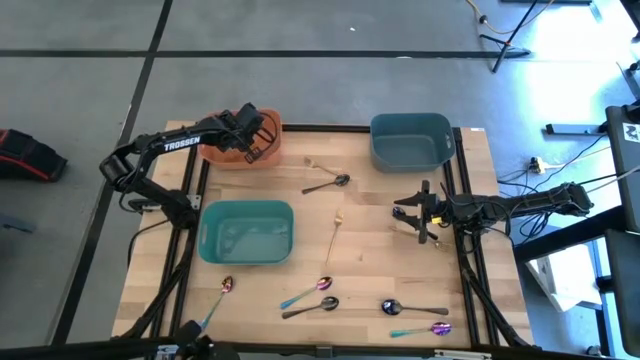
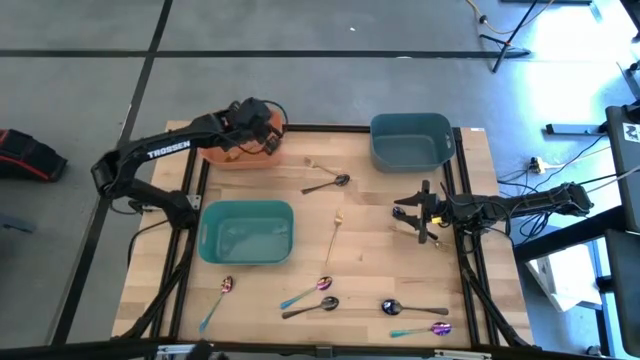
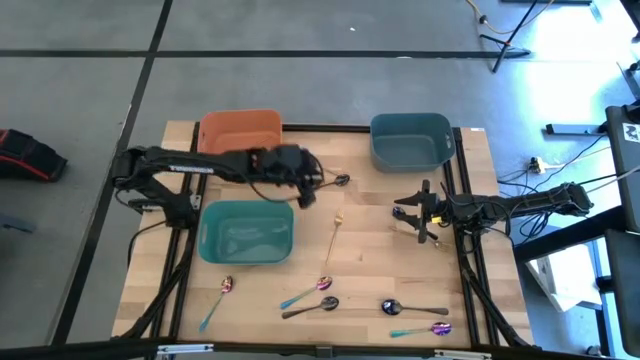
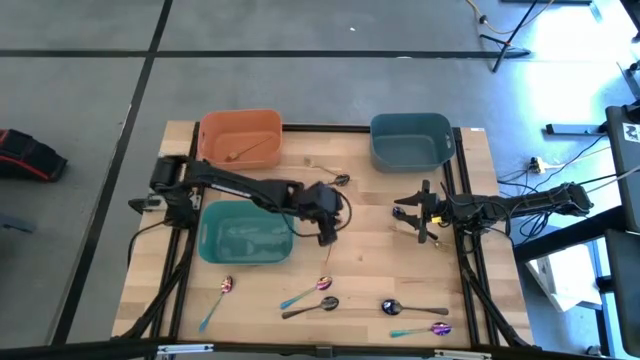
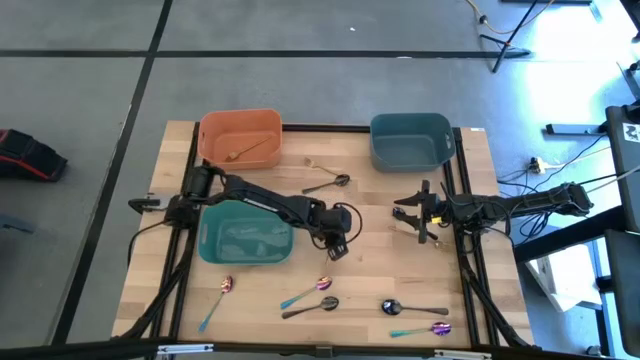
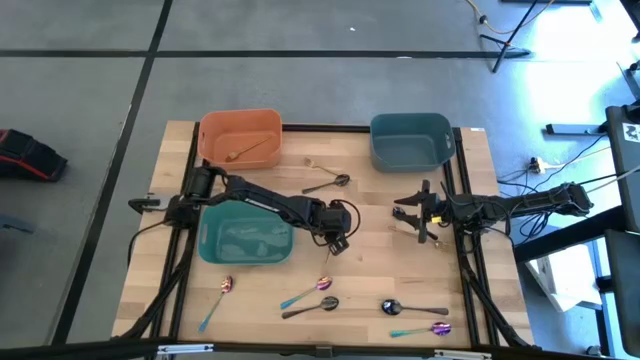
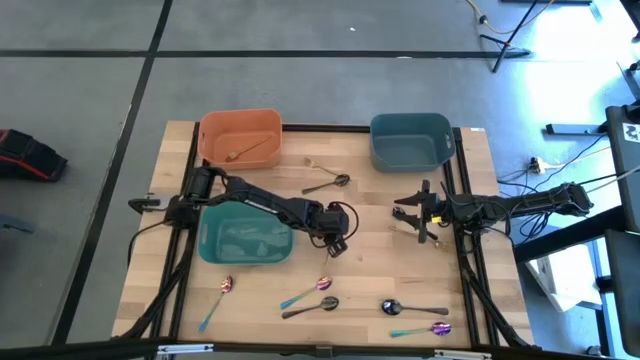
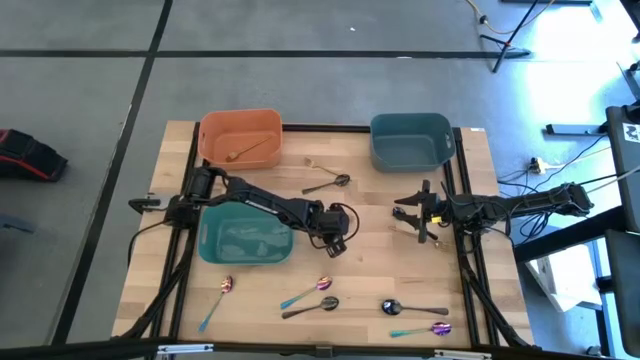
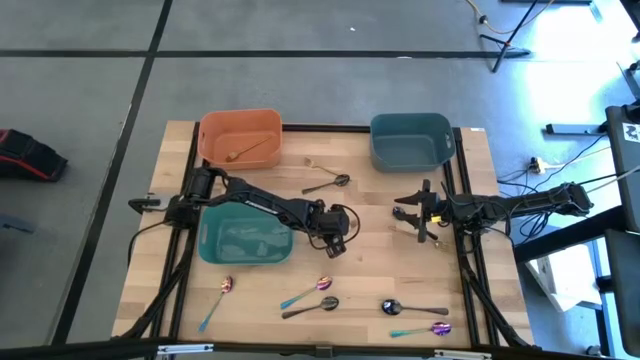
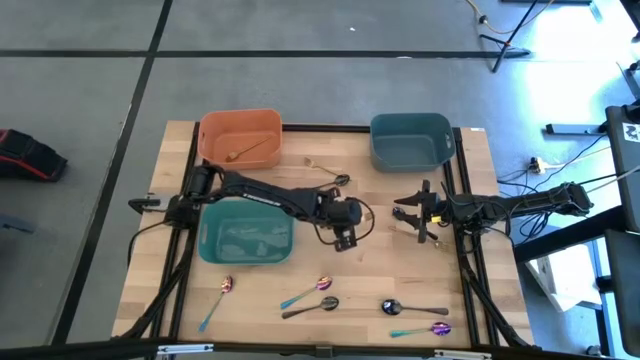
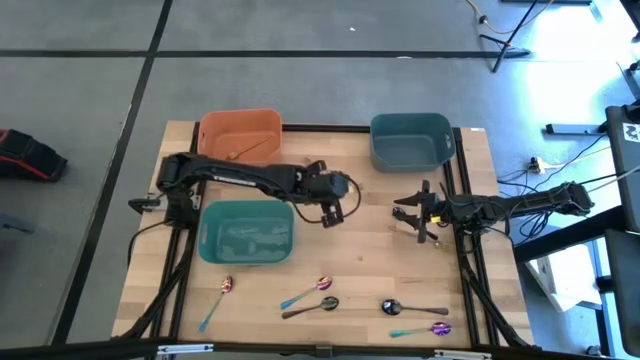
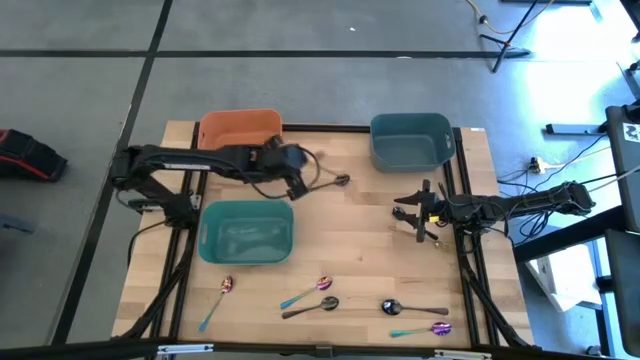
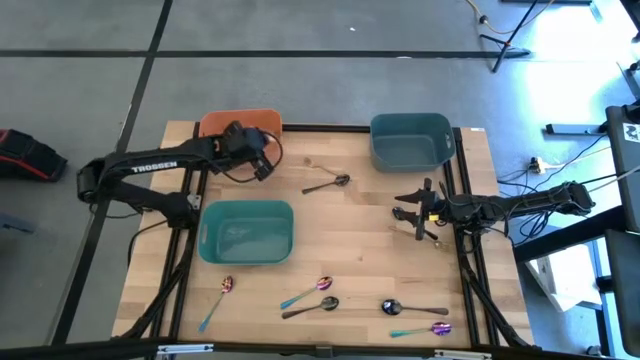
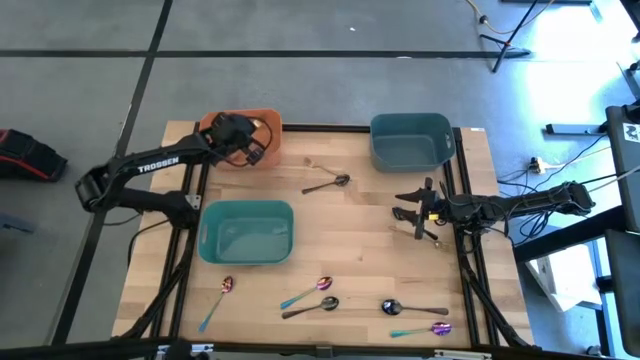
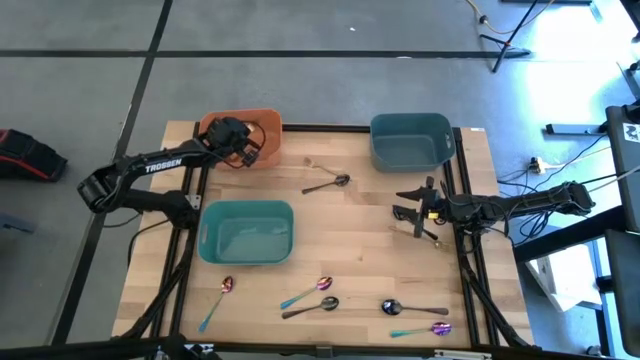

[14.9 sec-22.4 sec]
Task: Sort silverware by color (type)
Put the bottom left yellow fork into the orange bin

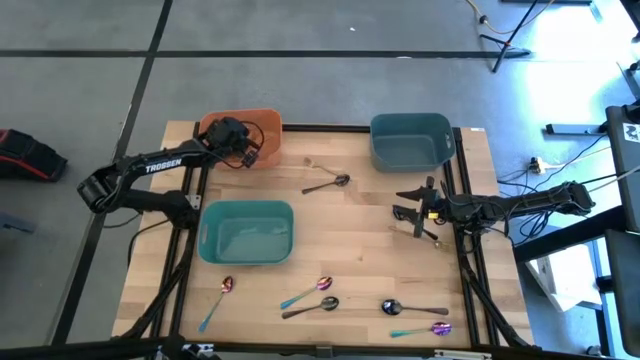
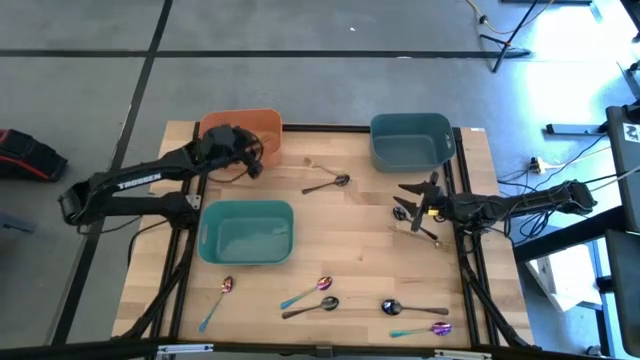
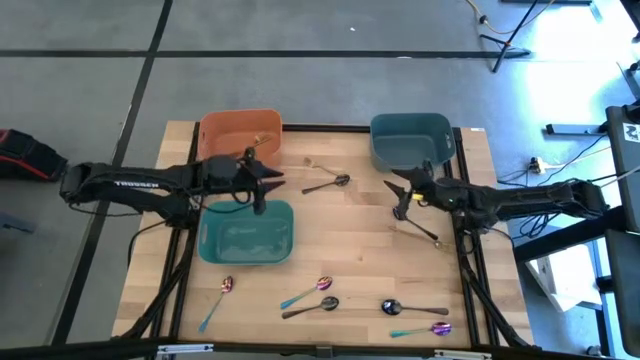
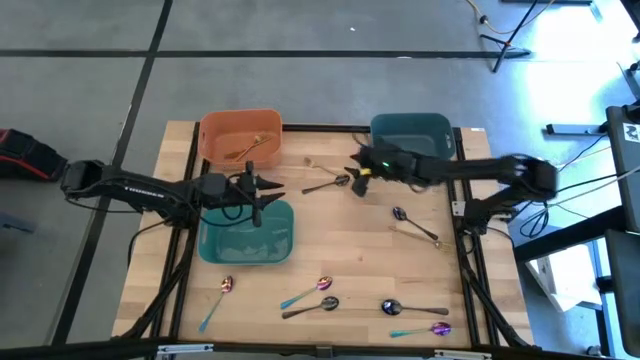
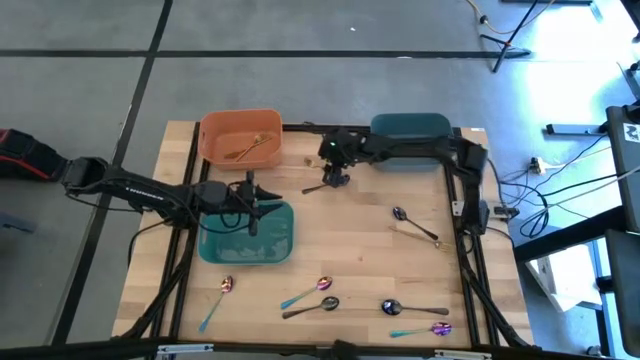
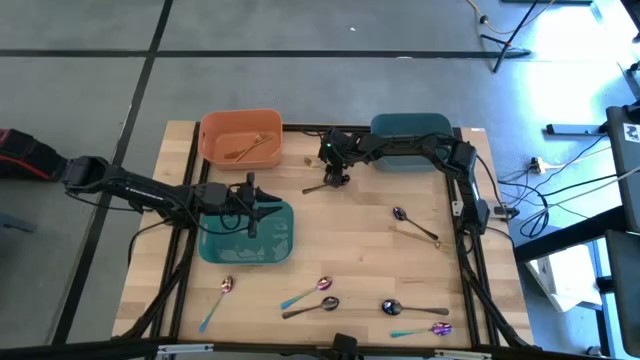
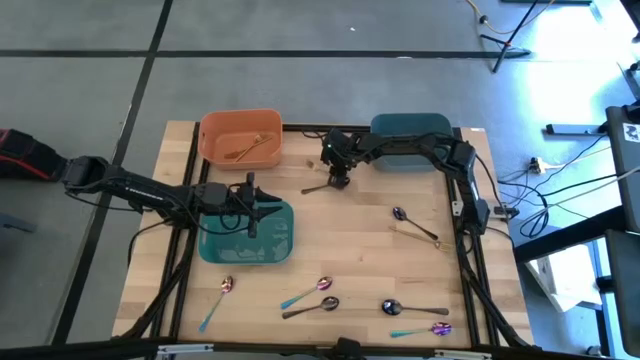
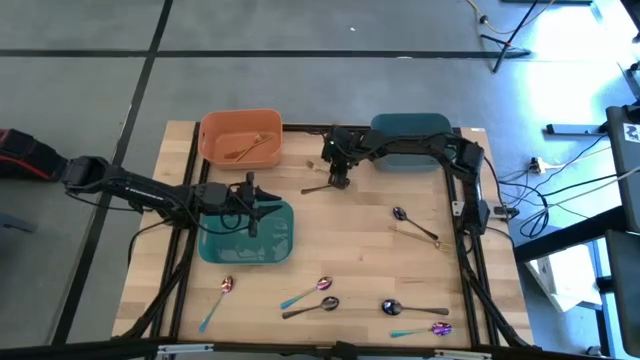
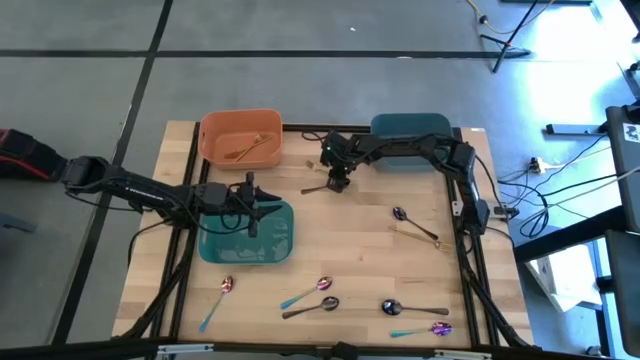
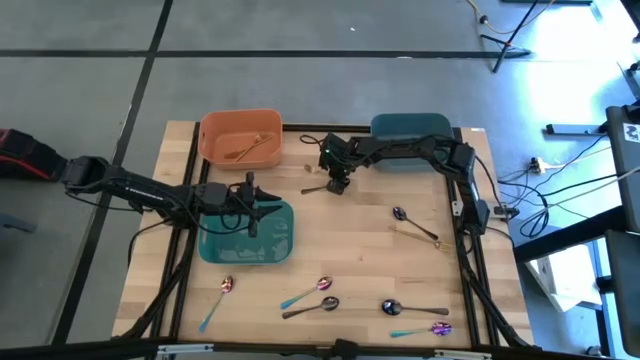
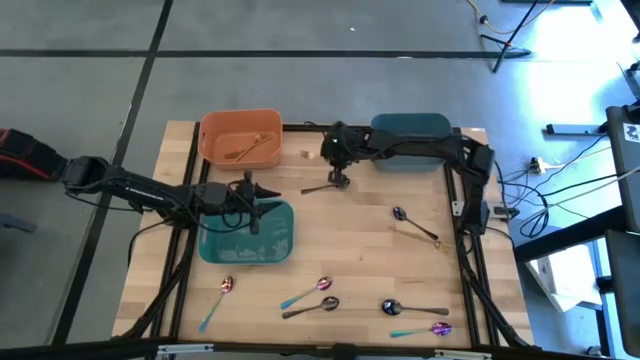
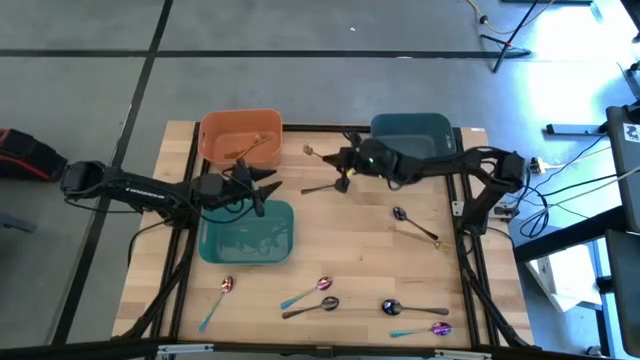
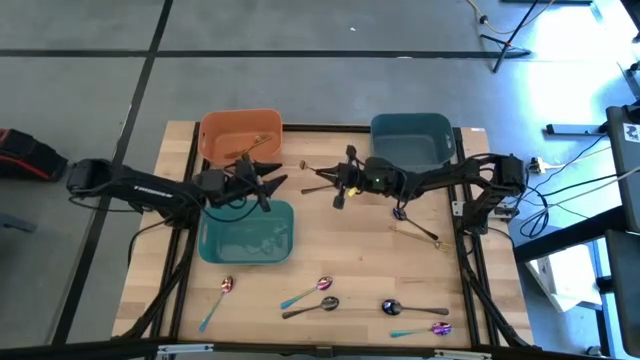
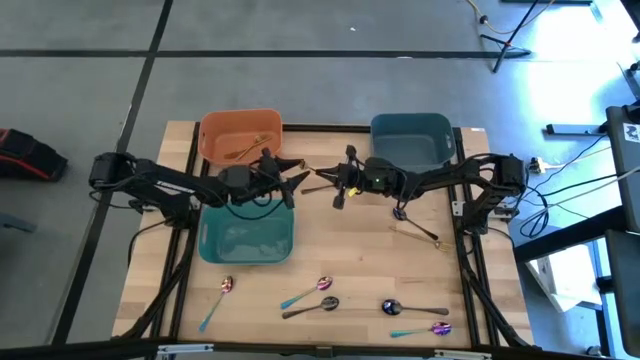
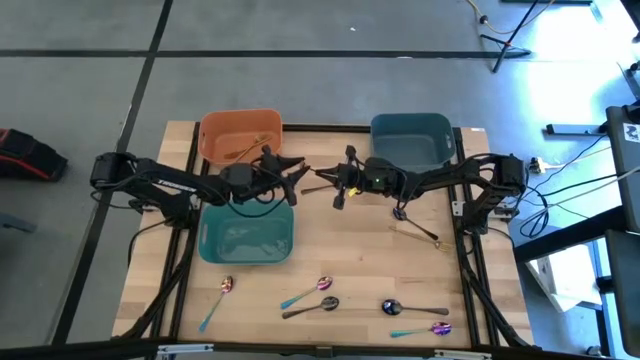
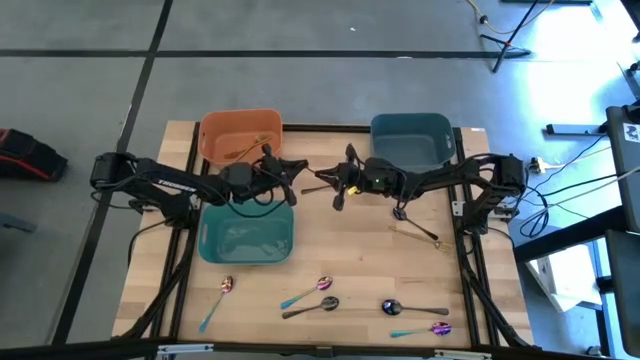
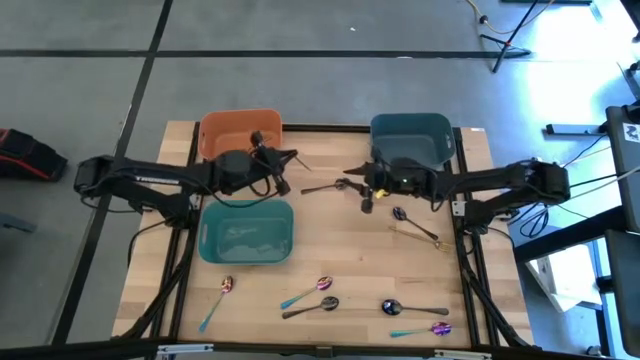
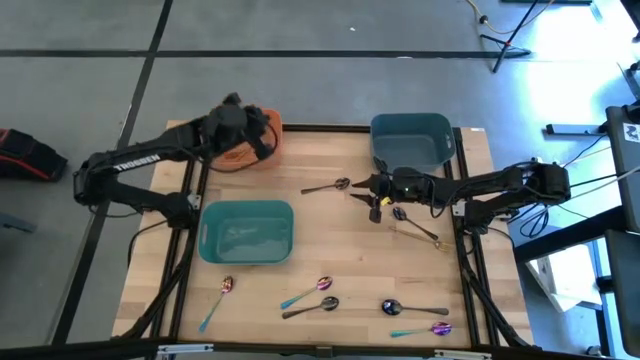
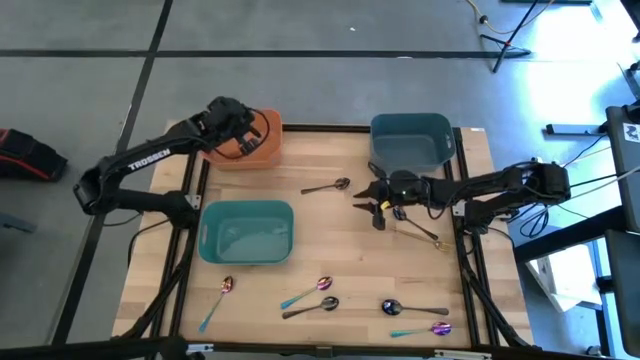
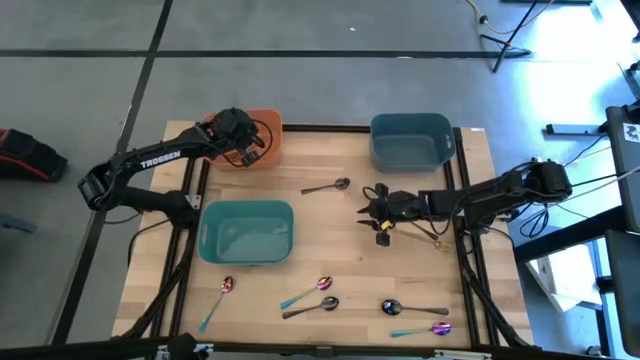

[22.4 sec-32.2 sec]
Put the top yellow fork into the orange bin

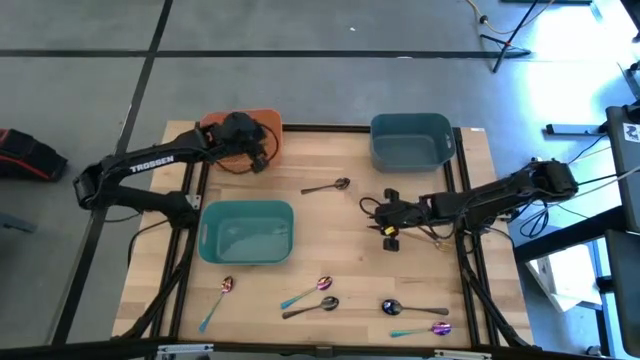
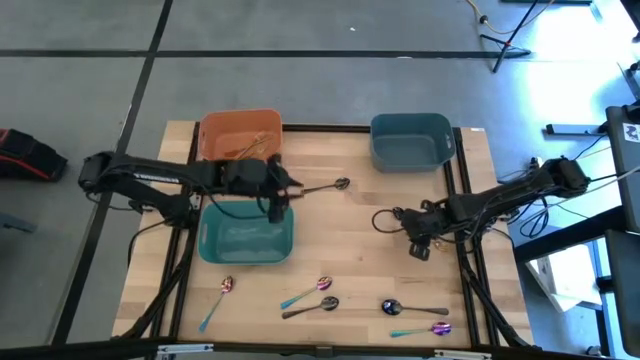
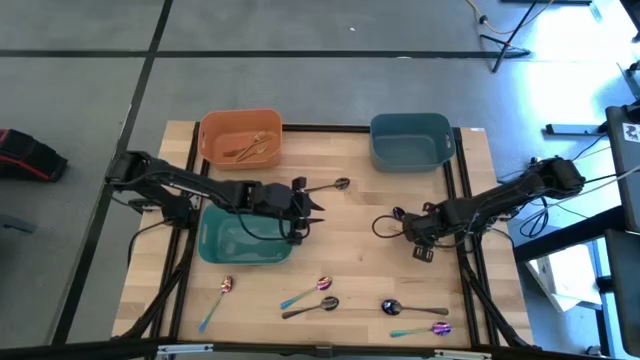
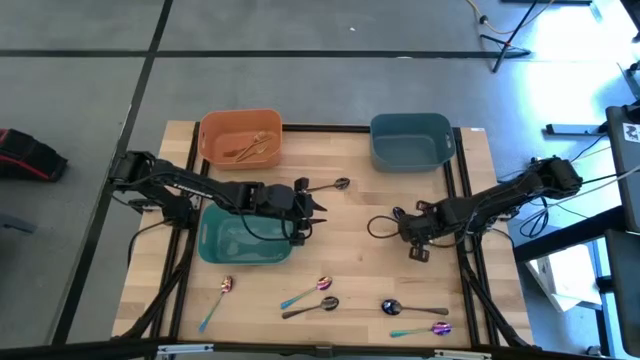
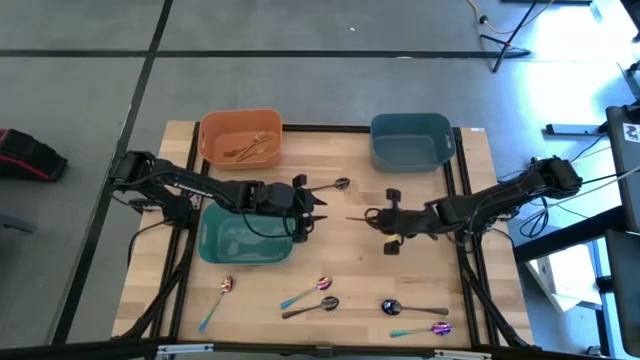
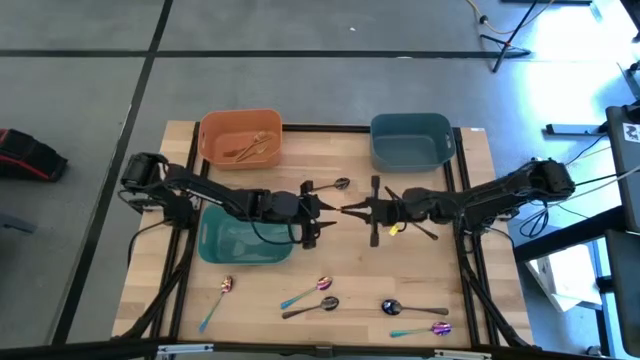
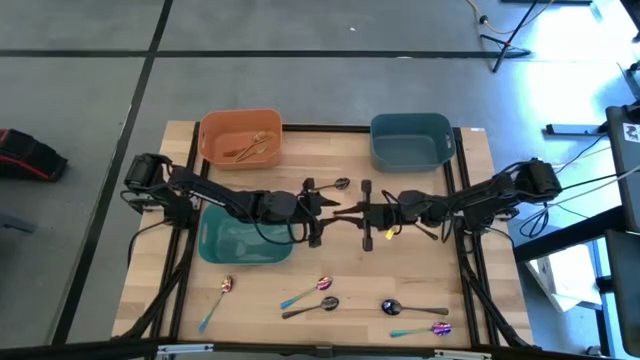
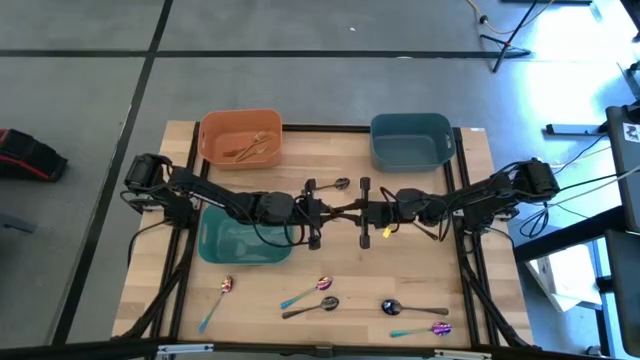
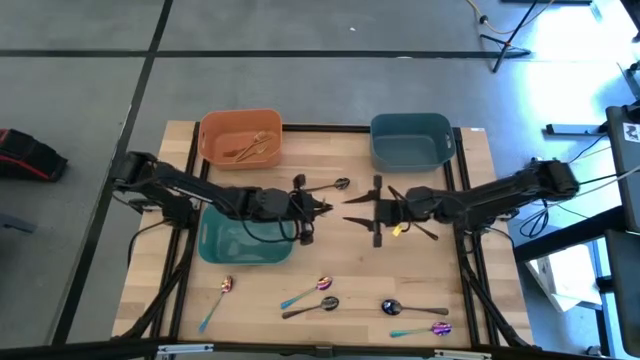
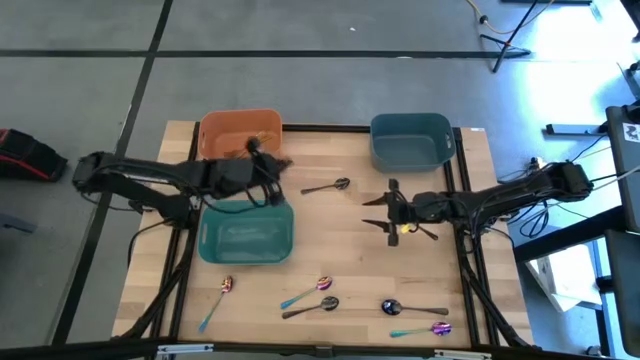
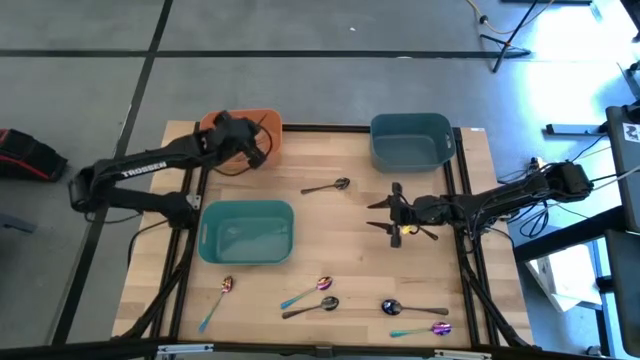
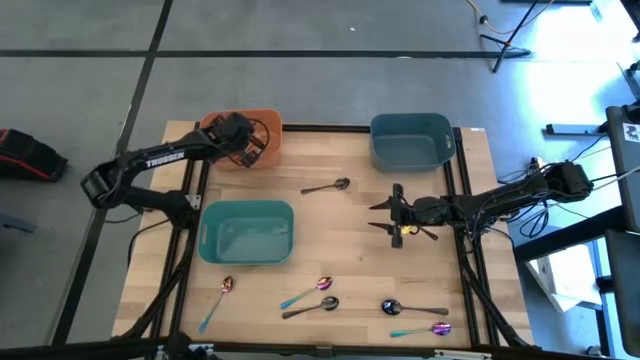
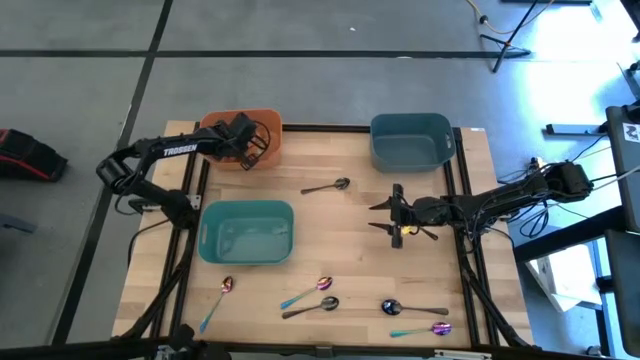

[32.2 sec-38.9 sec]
Put the yellow fork into the orange bin
